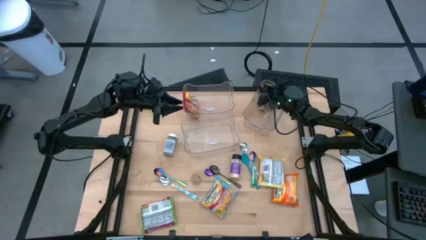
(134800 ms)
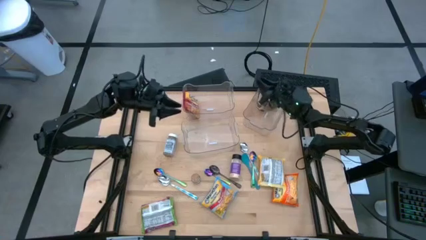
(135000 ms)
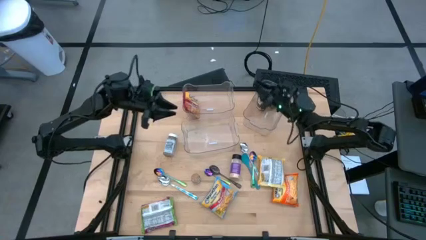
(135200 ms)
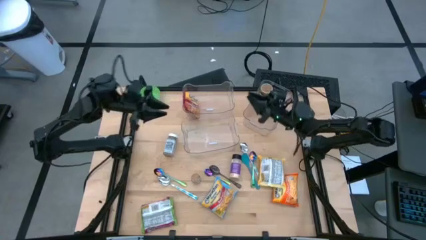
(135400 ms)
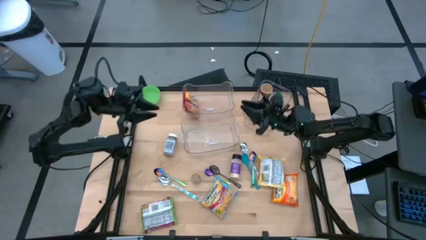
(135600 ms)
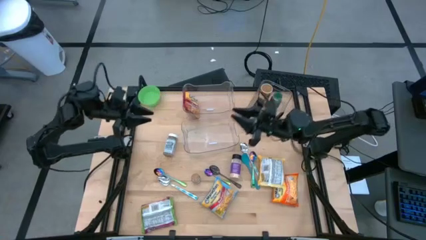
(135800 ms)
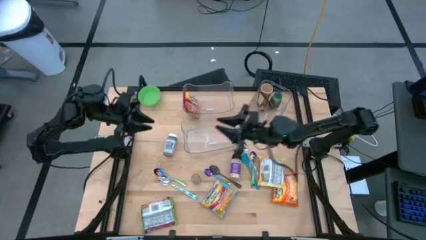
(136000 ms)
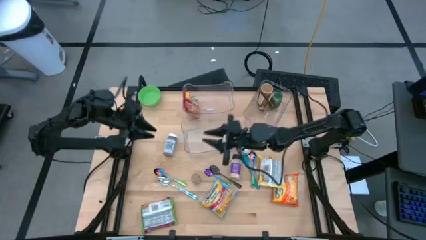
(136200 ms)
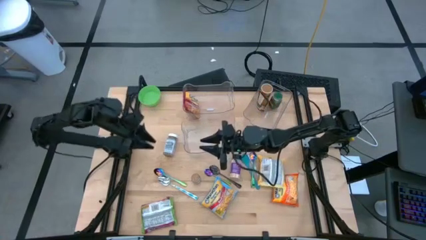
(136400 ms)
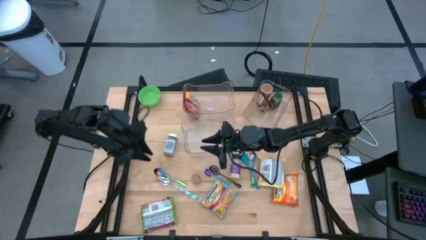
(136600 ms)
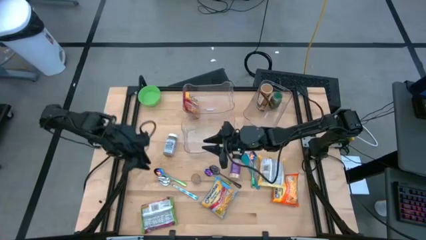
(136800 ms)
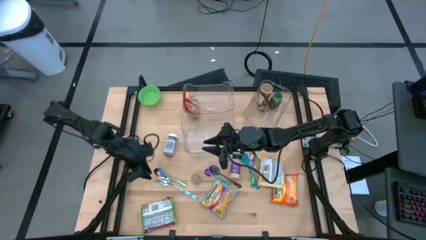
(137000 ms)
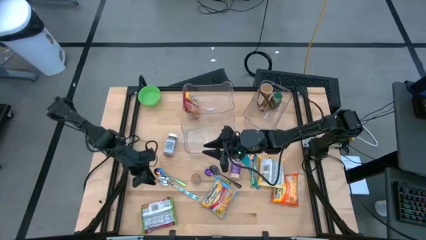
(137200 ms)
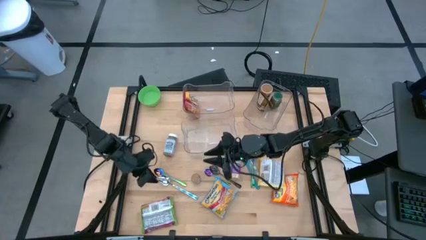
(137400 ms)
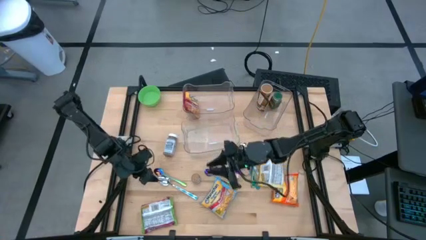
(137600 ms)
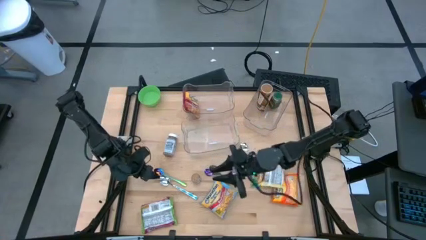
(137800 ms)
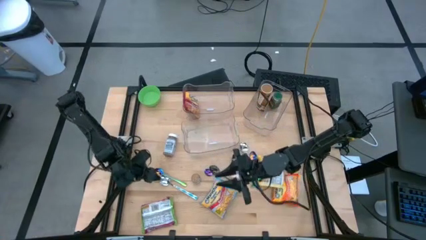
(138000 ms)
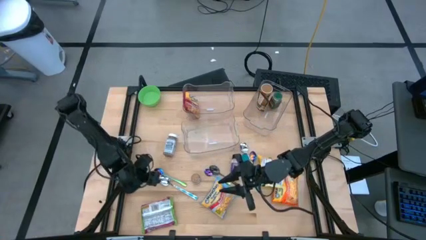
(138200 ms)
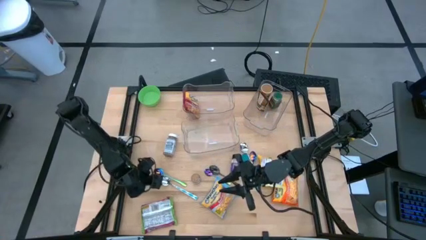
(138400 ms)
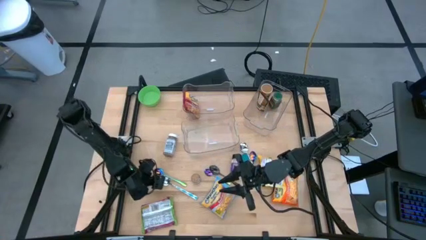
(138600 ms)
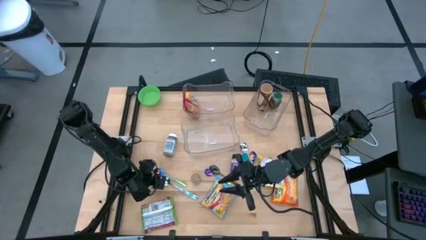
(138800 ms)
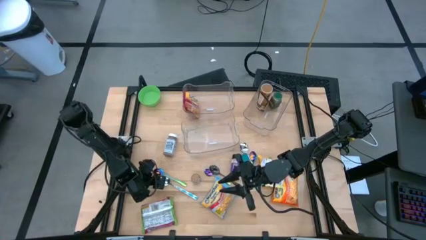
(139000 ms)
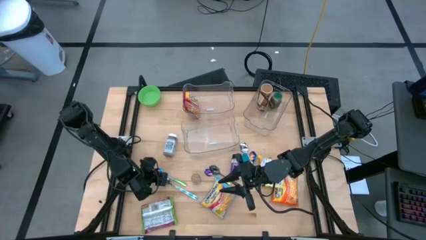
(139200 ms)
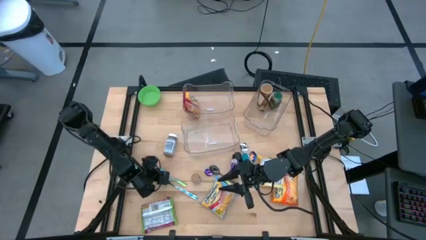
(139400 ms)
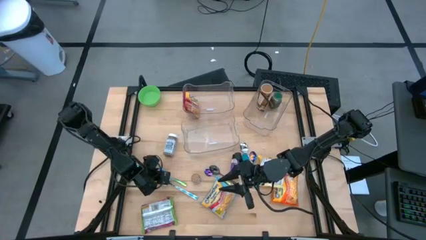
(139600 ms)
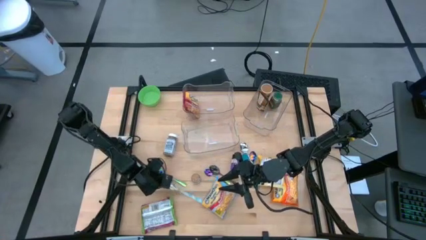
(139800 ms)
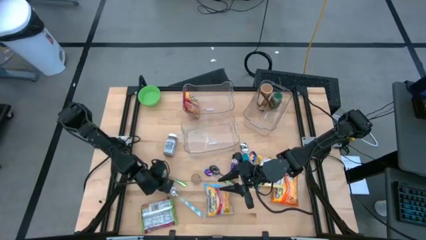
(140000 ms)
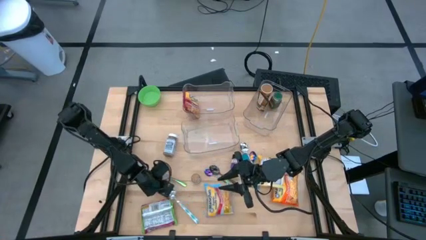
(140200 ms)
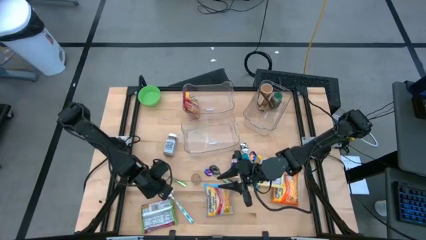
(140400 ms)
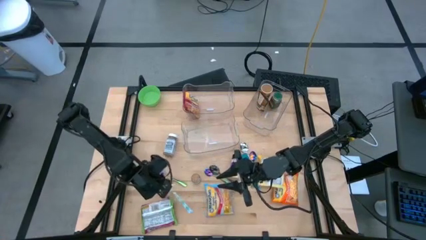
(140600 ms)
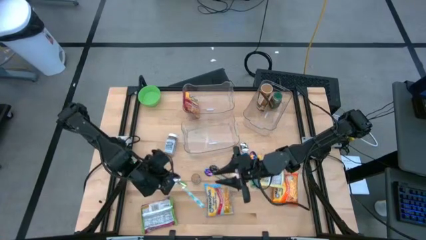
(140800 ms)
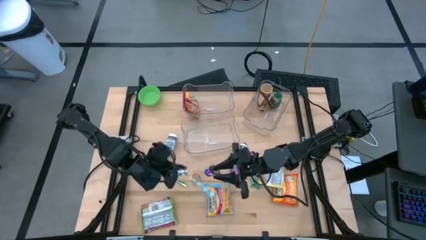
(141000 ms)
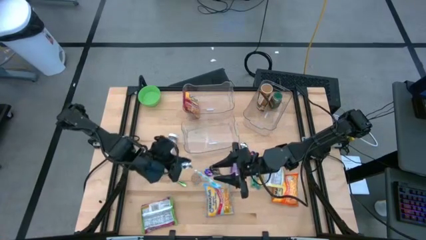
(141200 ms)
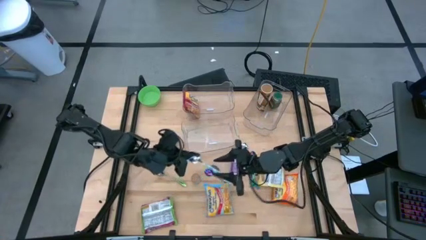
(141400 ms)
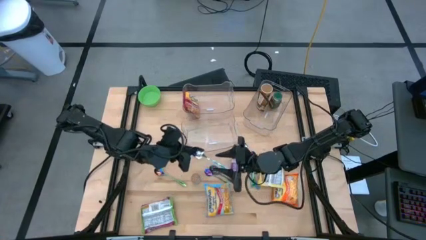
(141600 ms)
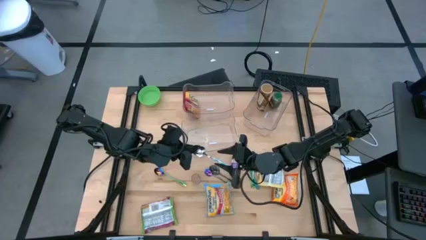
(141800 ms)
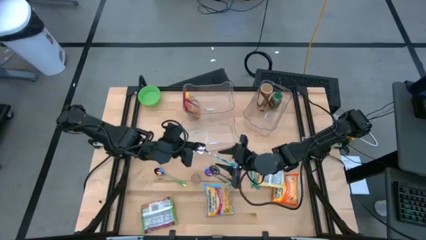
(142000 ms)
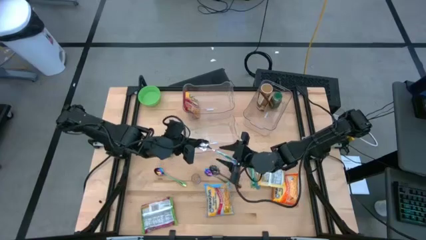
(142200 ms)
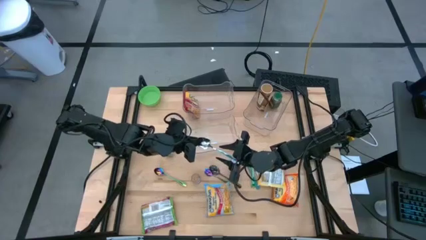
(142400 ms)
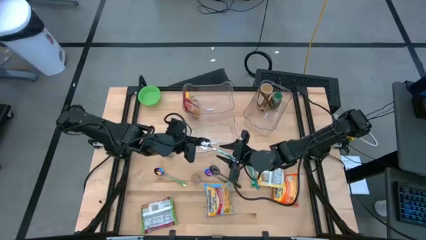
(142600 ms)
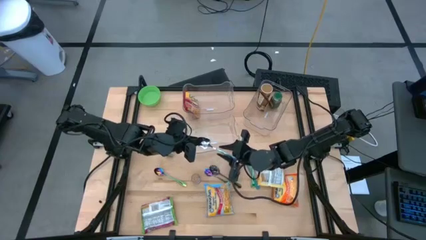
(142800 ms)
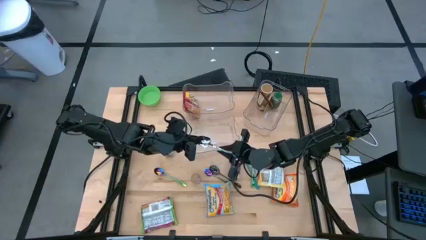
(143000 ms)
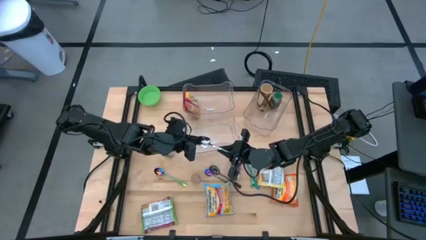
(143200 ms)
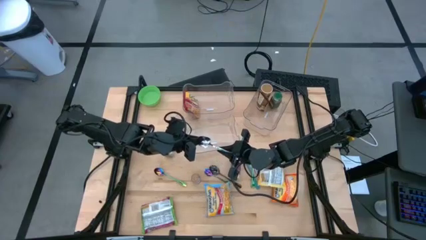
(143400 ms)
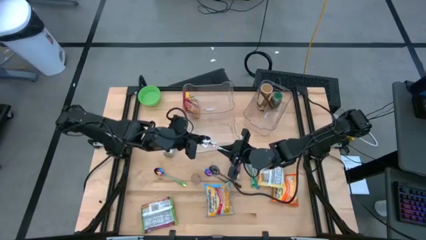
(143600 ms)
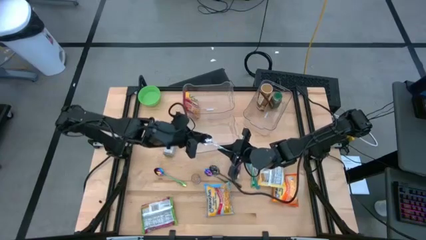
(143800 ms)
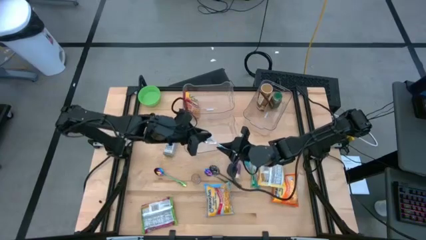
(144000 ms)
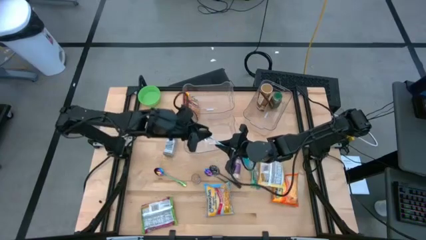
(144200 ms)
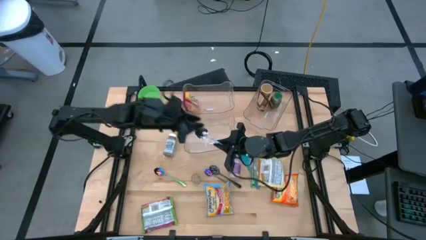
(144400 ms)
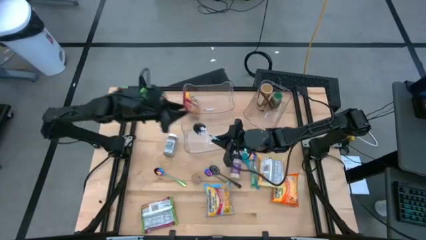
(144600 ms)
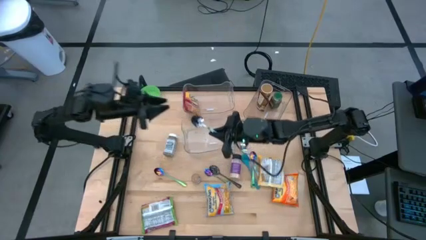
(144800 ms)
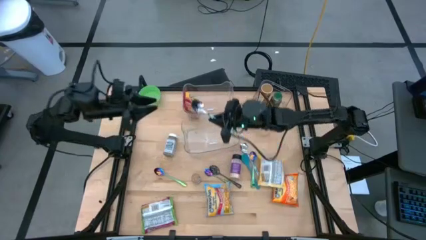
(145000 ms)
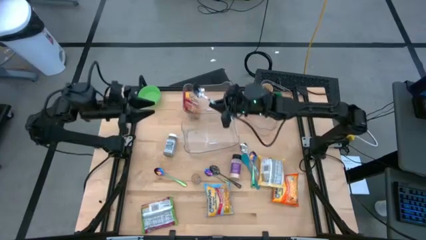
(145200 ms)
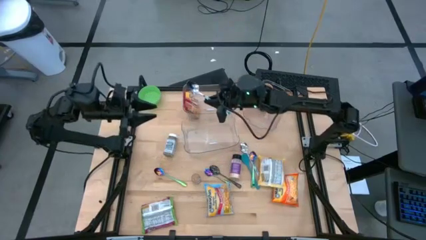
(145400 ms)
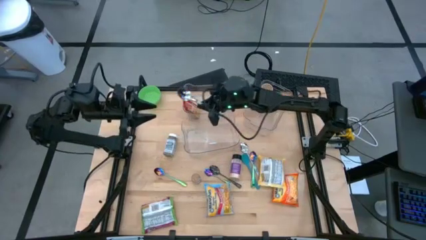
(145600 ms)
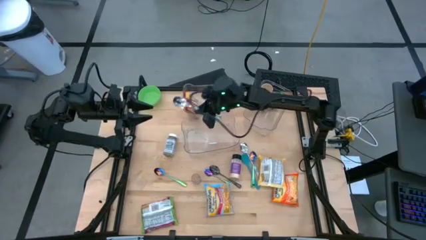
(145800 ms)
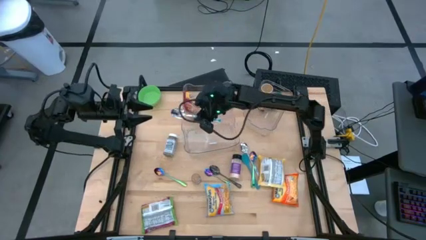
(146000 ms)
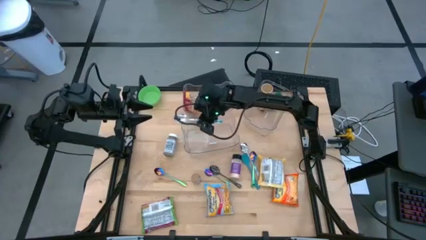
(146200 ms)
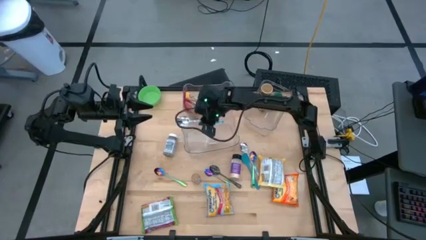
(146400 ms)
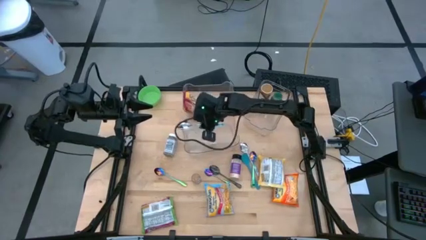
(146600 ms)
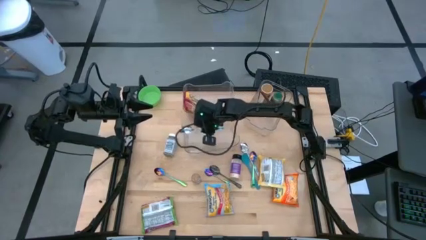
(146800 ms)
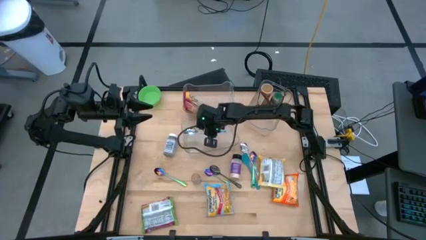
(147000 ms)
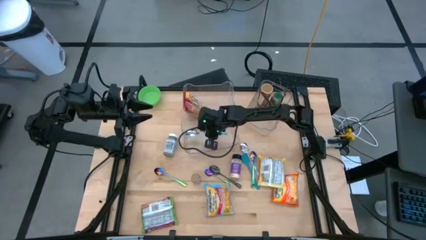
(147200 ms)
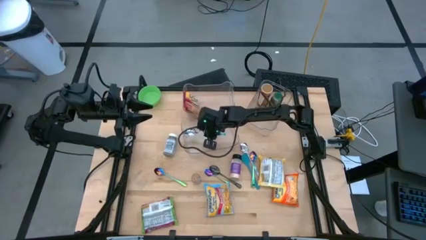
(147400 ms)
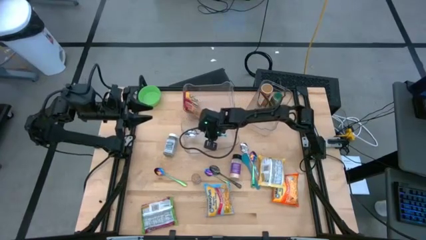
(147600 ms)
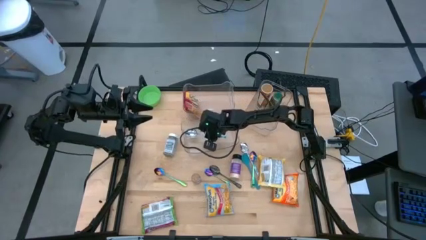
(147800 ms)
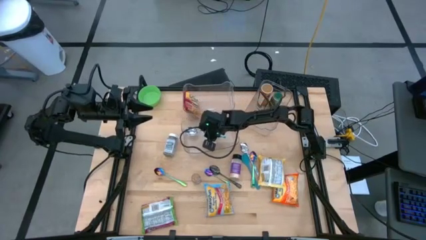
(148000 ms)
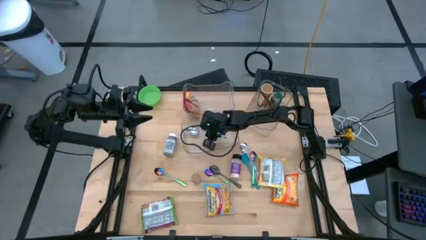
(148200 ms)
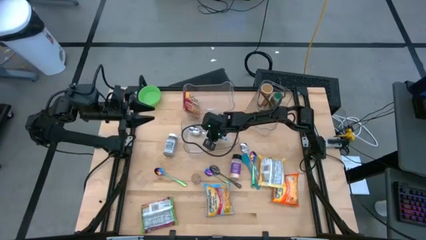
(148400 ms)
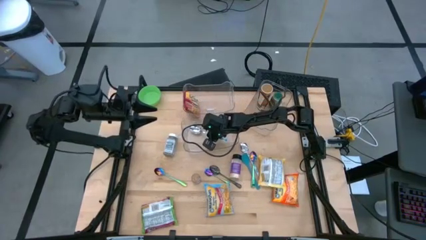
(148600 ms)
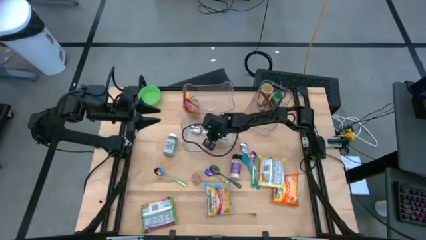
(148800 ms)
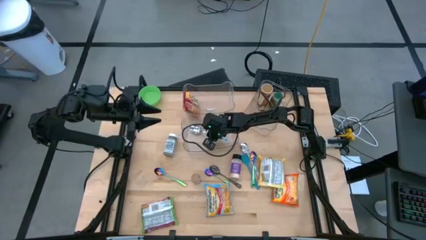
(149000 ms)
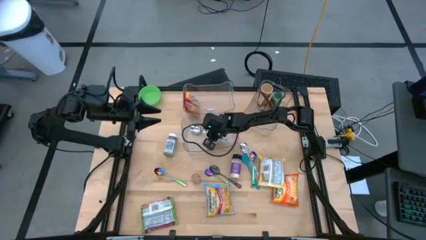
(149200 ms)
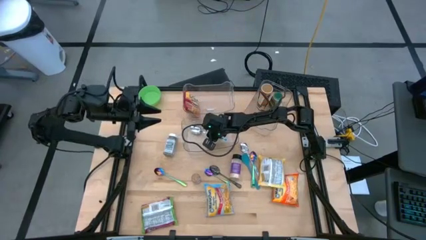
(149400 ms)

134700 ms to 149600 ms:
Task: Pick & Place Food Item
Put the left blue white spoon into the bottom transparent bin
